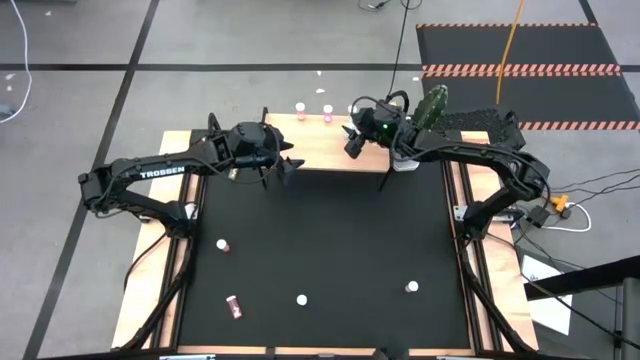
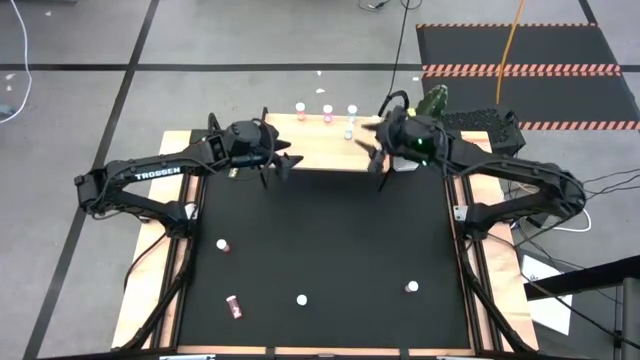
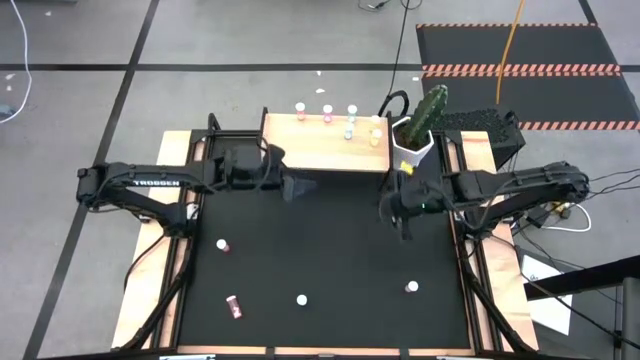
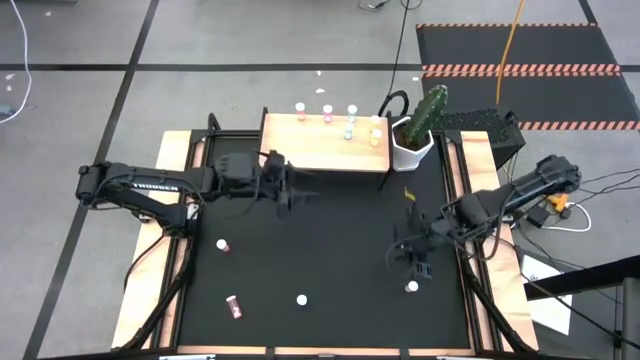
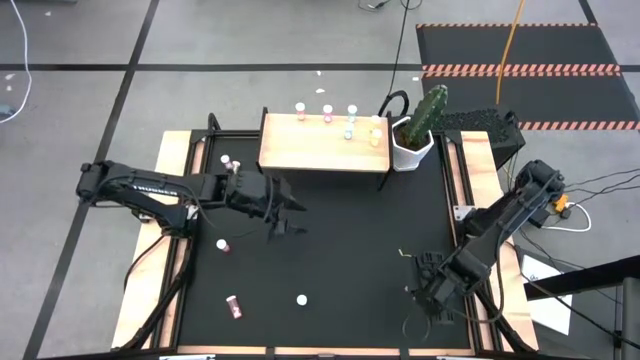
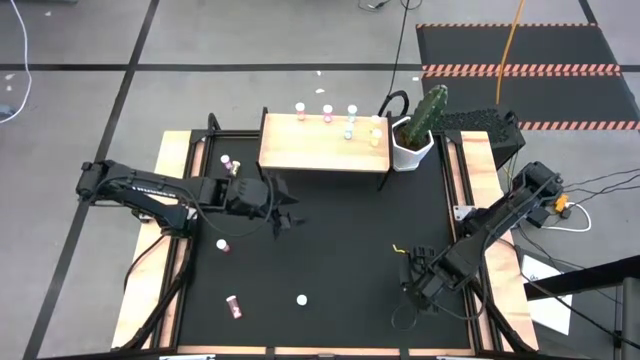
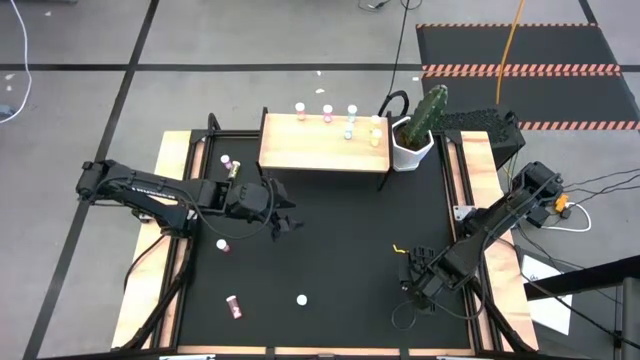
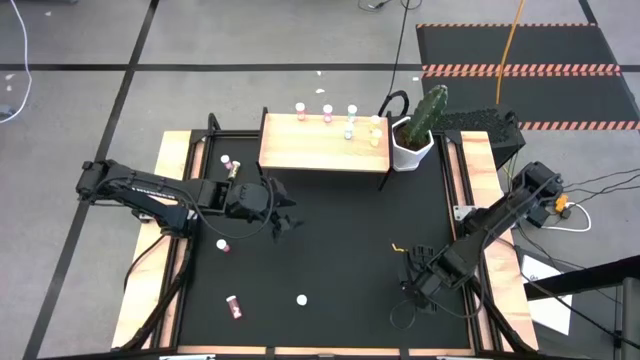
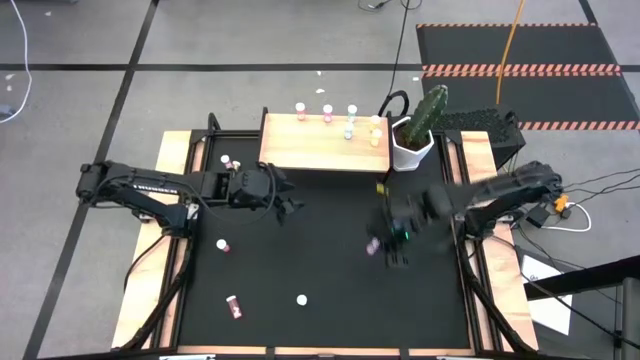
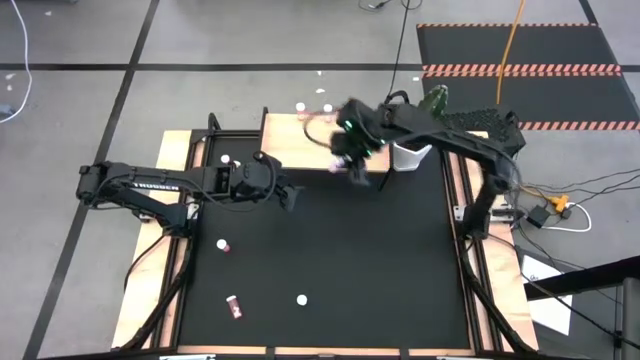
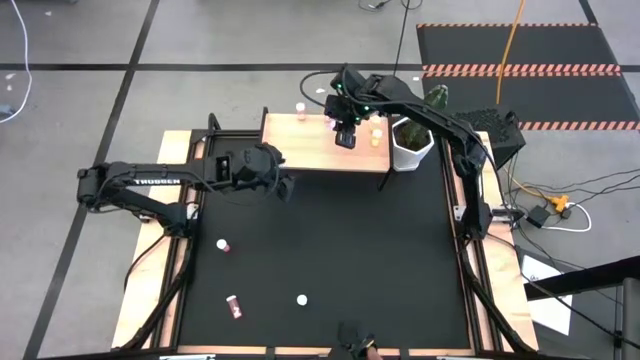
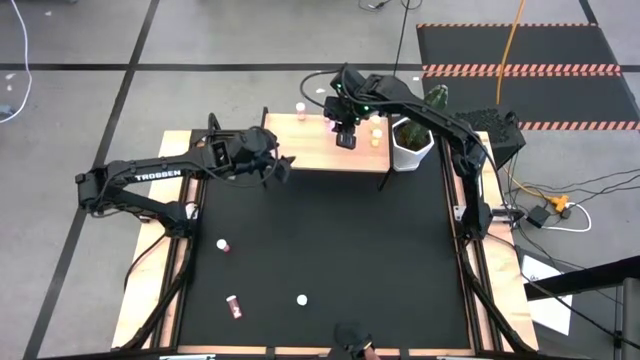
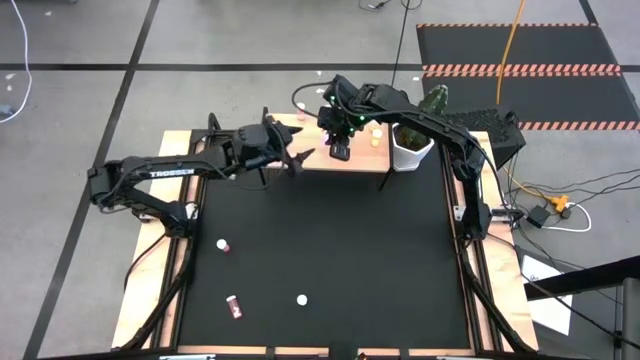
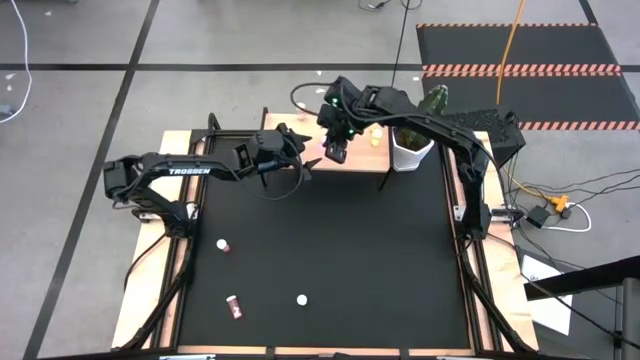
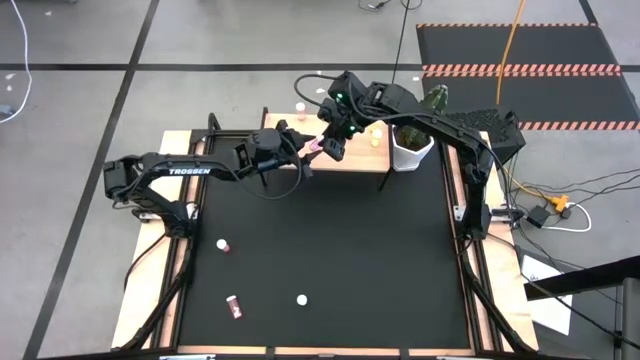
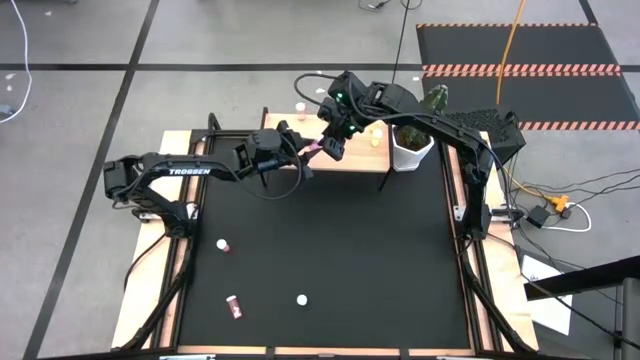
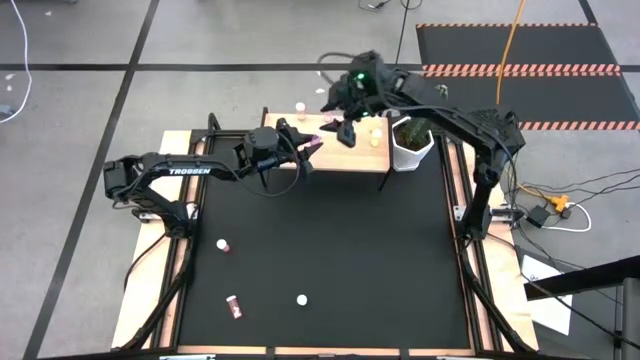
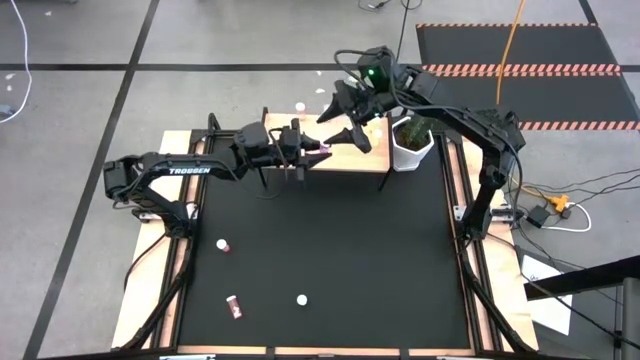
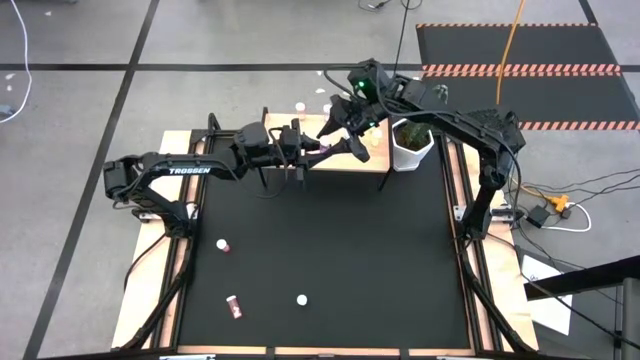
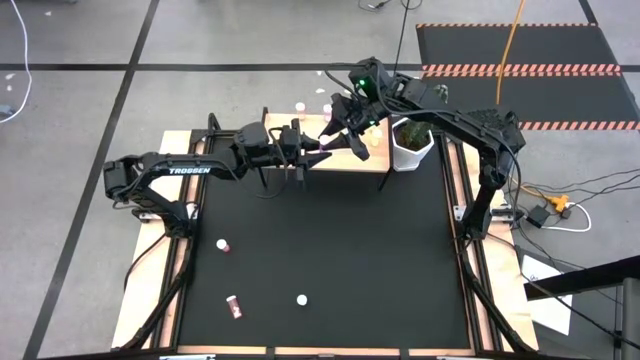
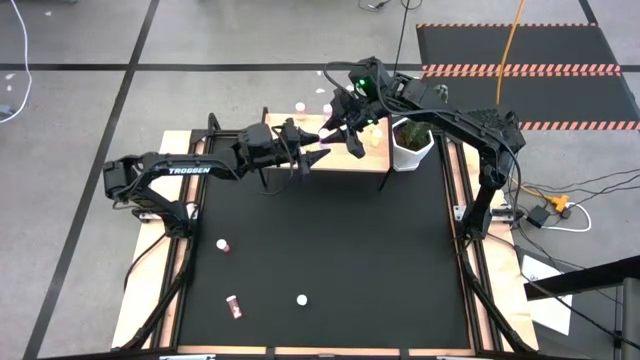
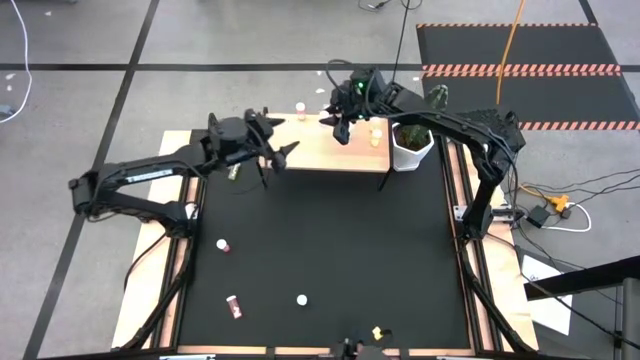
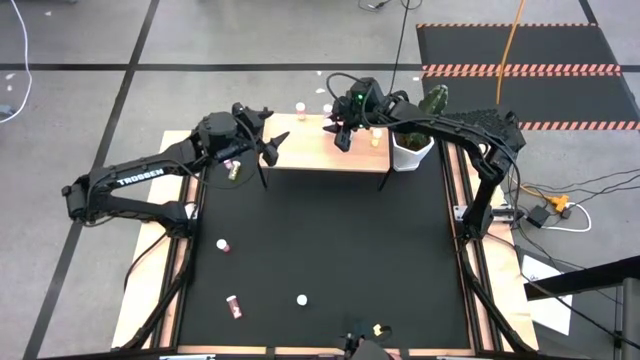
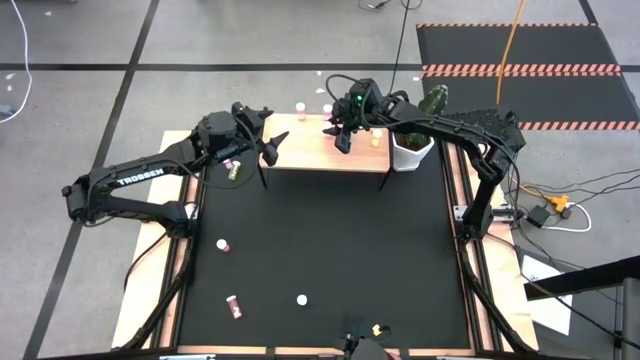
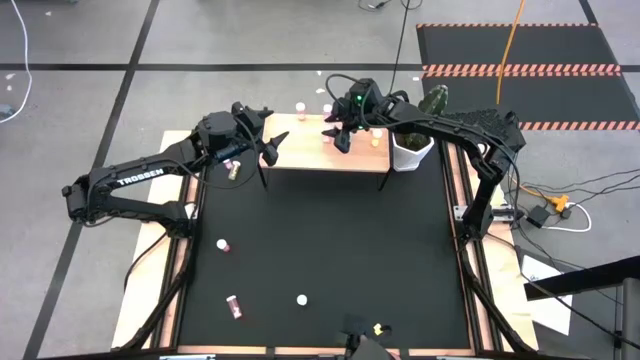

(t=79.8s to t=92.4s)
Task: Pick and place medicine bottles onto shelf by color
Put the bottom purple pill bottle on the shelf aligned with the other purple pill bottle

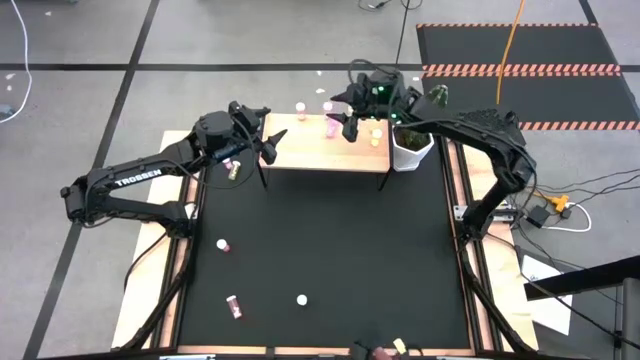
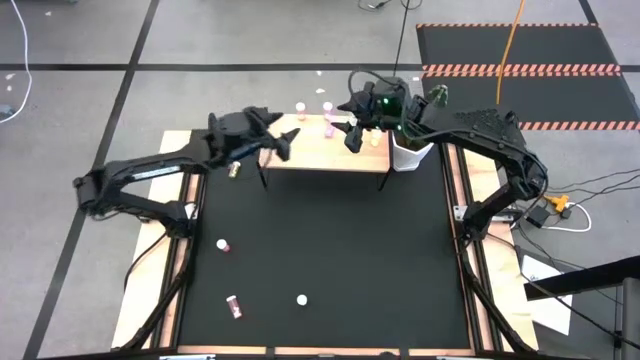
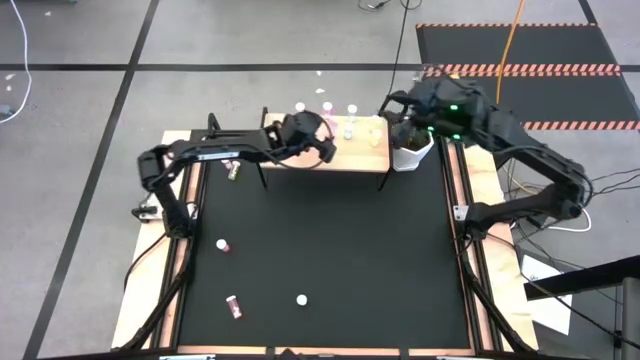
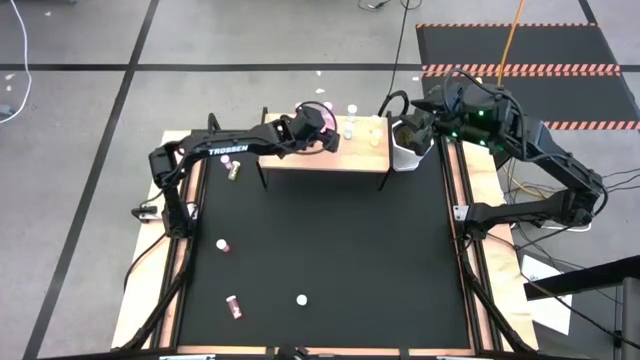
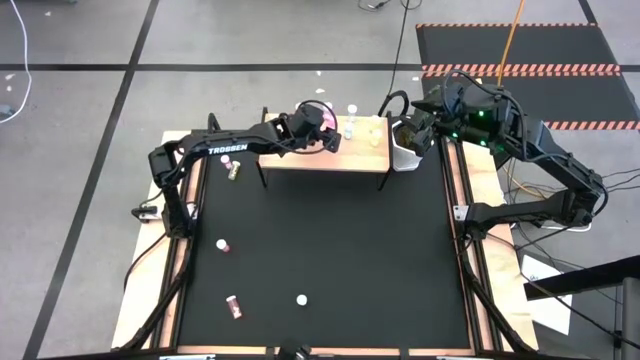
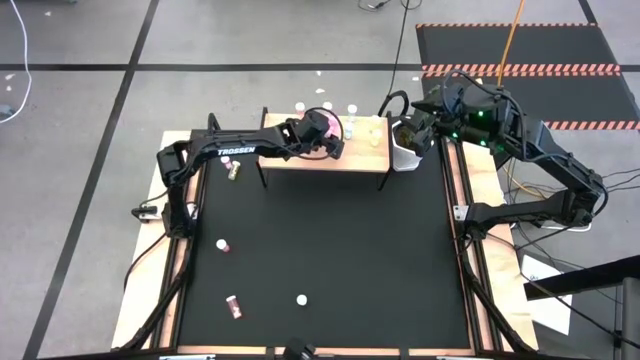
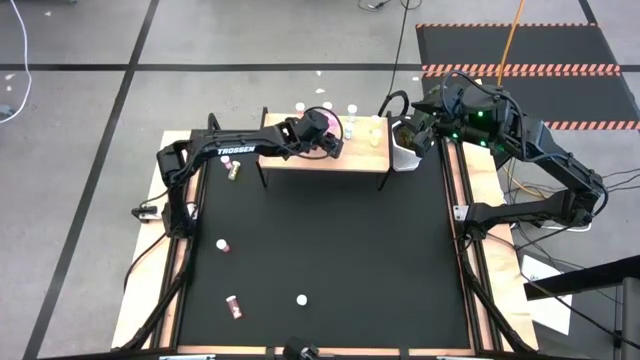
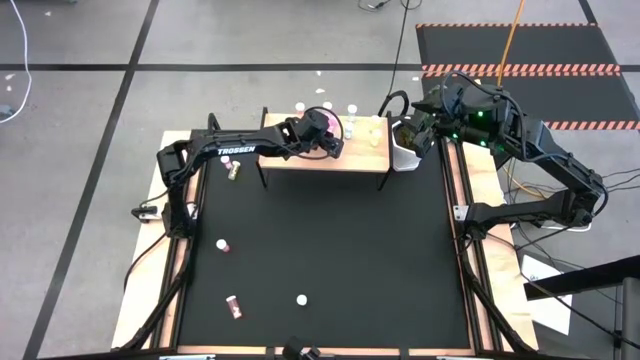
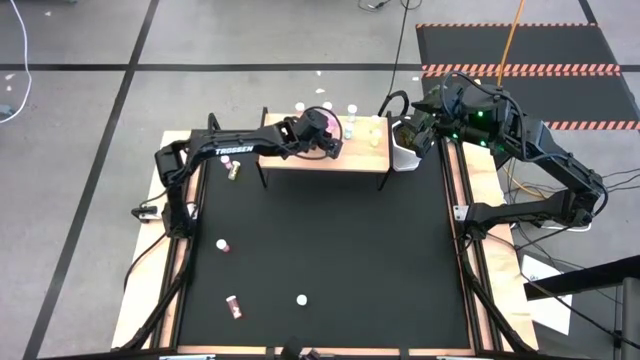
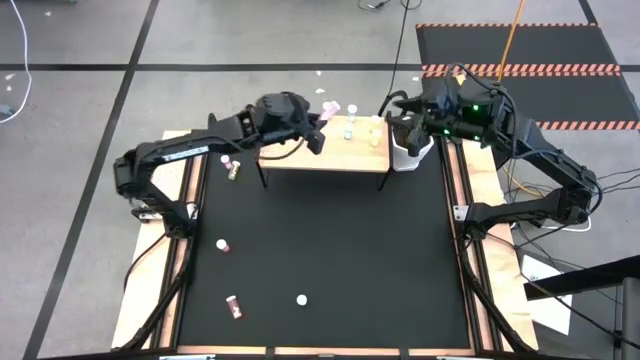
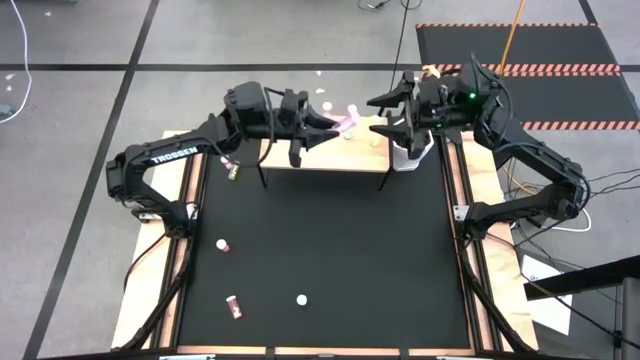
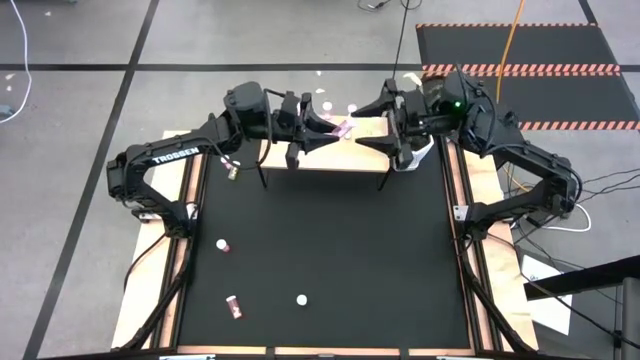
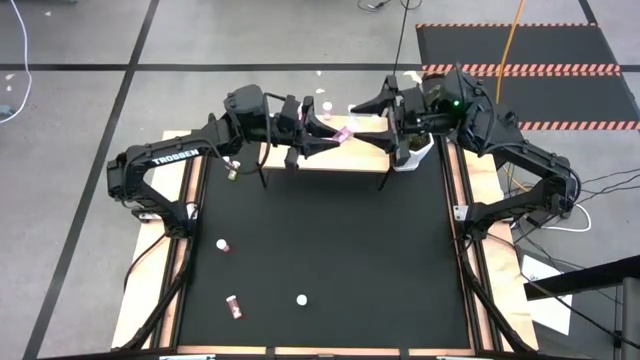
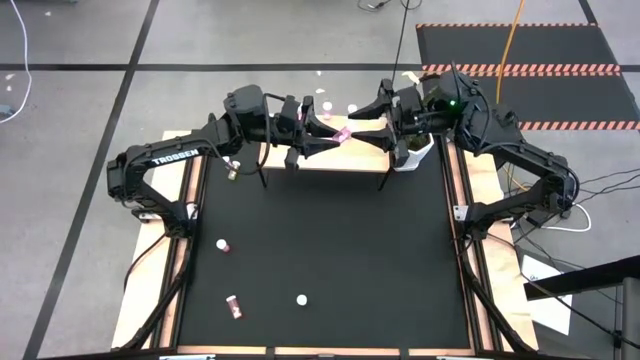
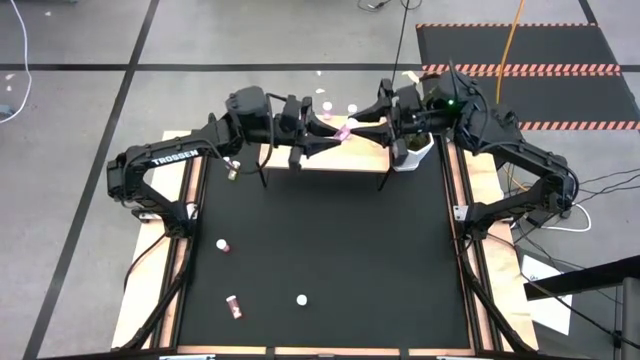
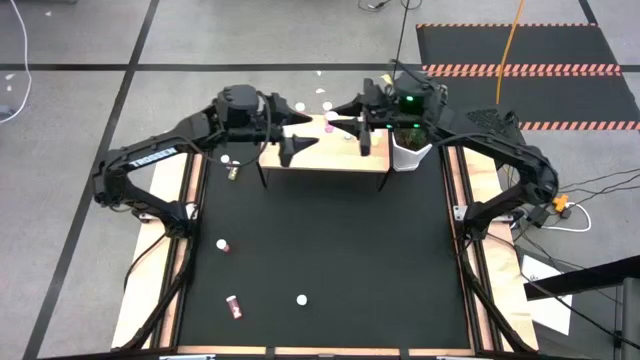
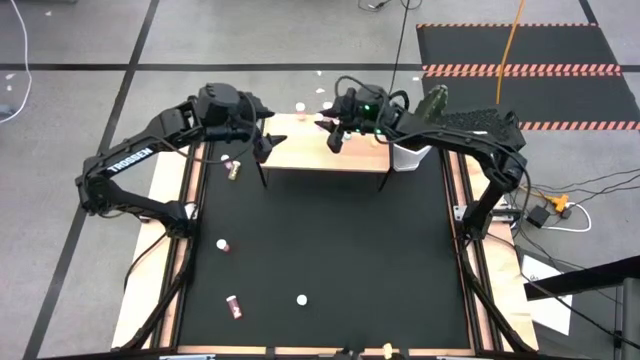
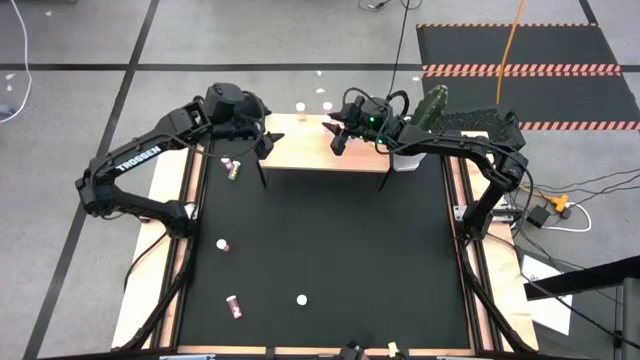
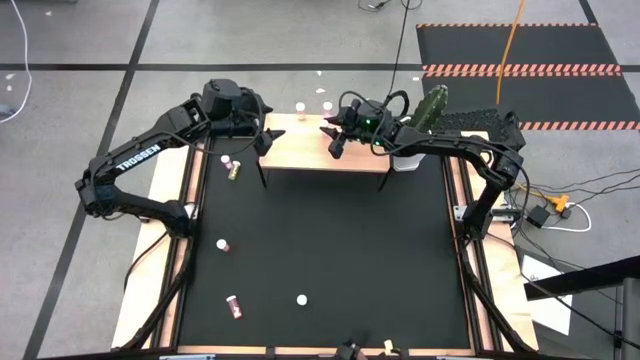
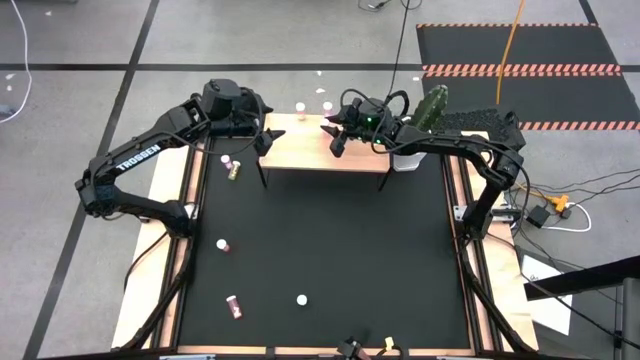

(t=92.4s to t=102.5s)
Put the right purple pill bottle on the shelf aligned with the other purple pill bottle
